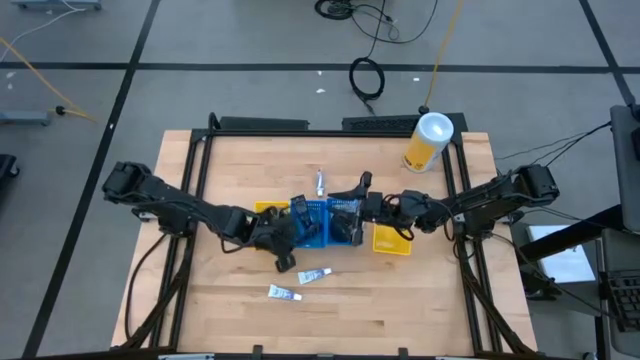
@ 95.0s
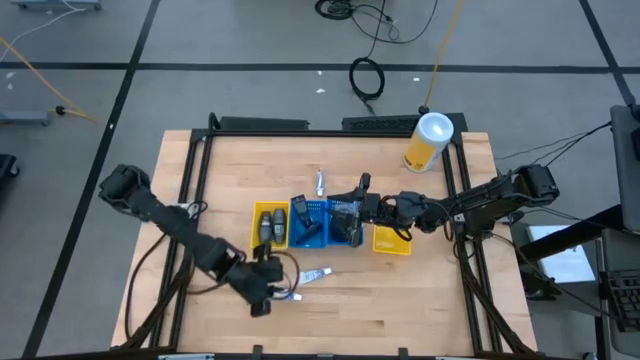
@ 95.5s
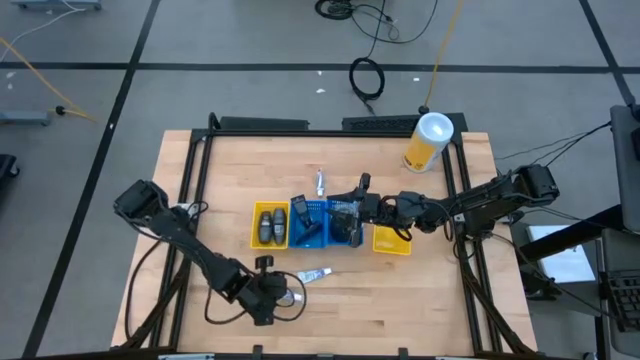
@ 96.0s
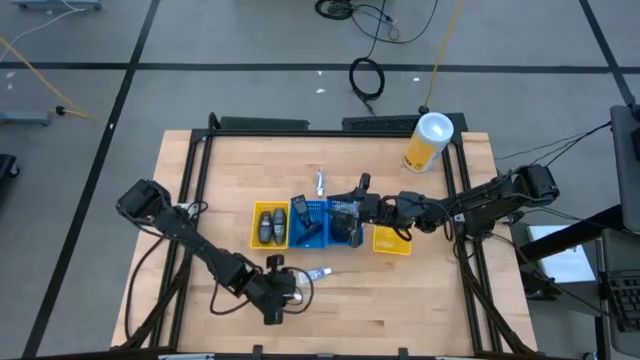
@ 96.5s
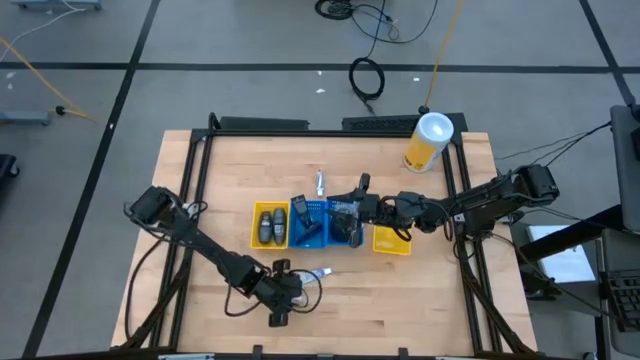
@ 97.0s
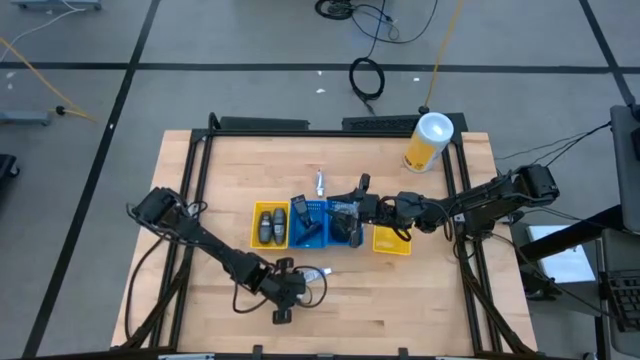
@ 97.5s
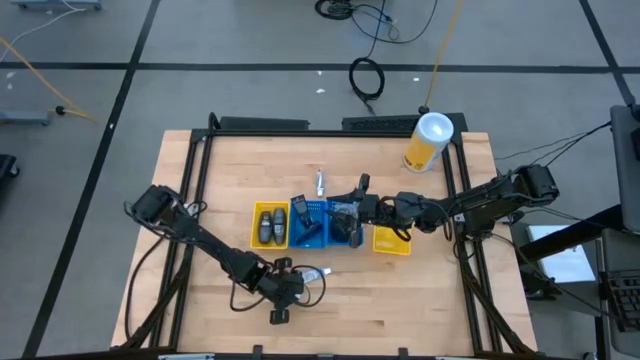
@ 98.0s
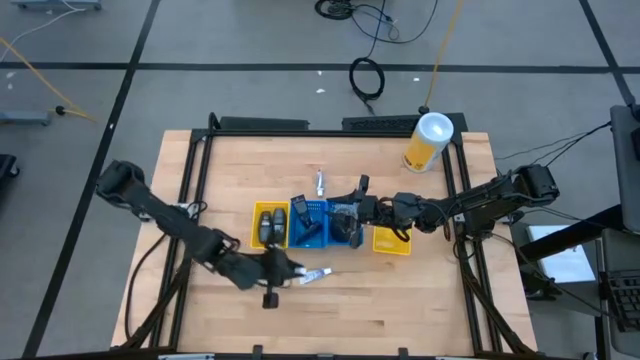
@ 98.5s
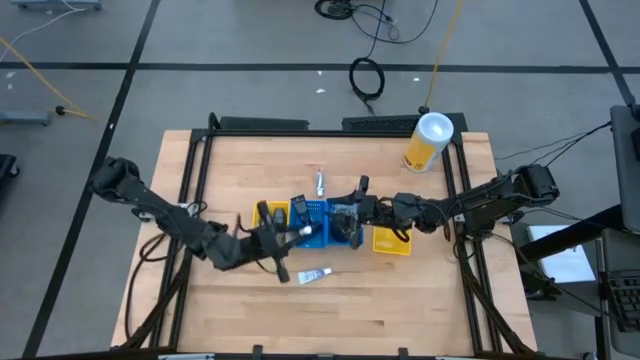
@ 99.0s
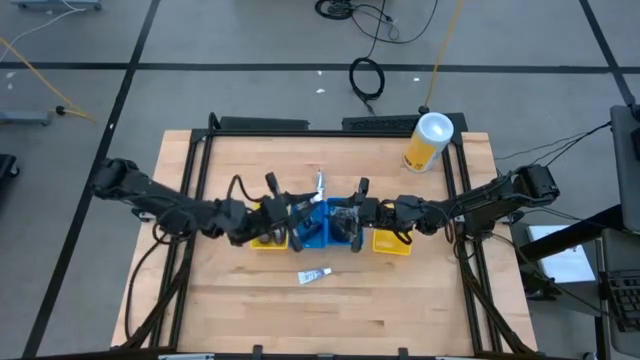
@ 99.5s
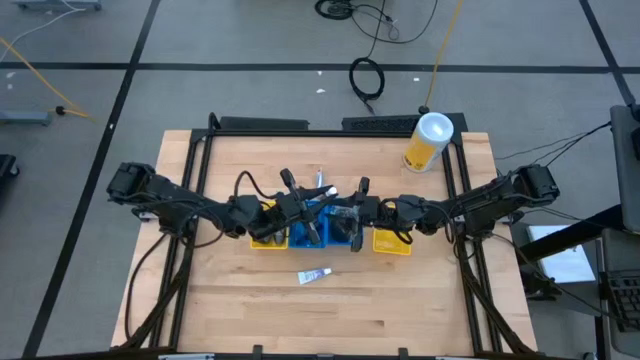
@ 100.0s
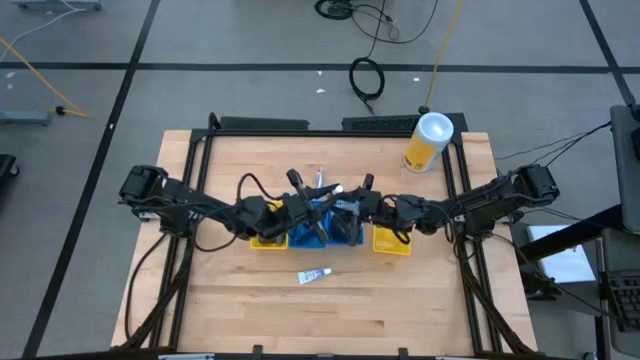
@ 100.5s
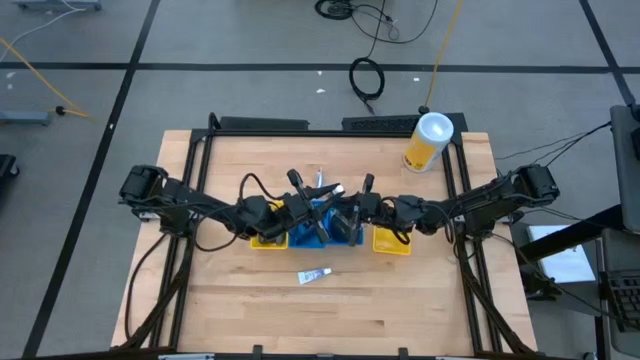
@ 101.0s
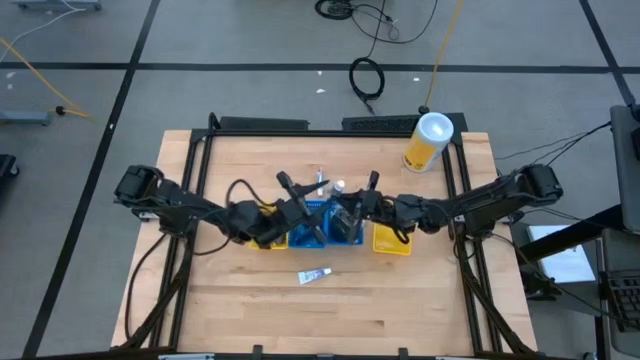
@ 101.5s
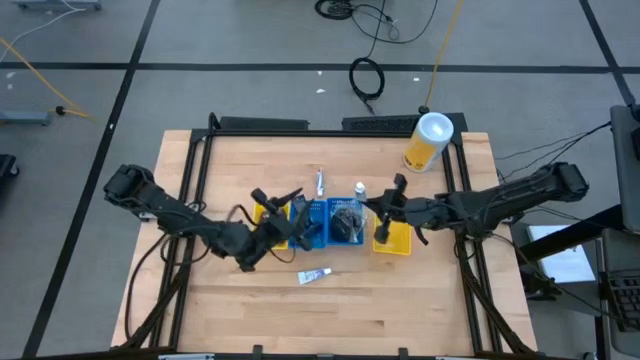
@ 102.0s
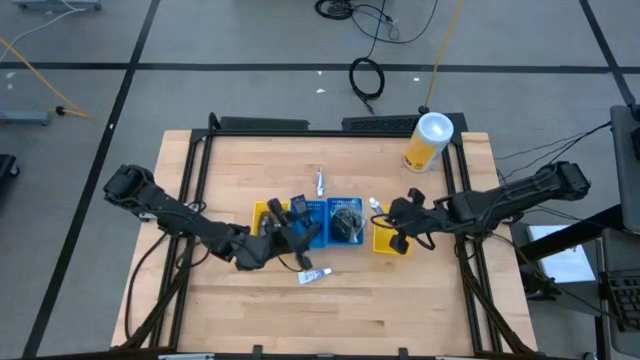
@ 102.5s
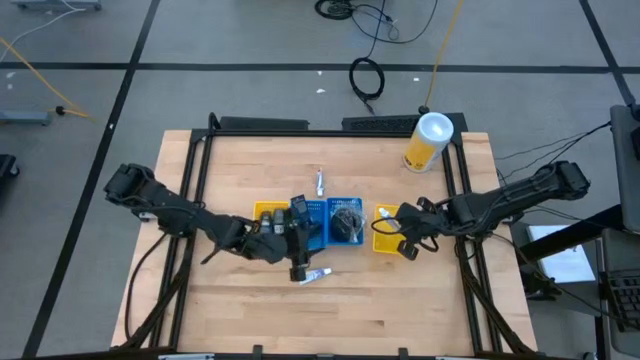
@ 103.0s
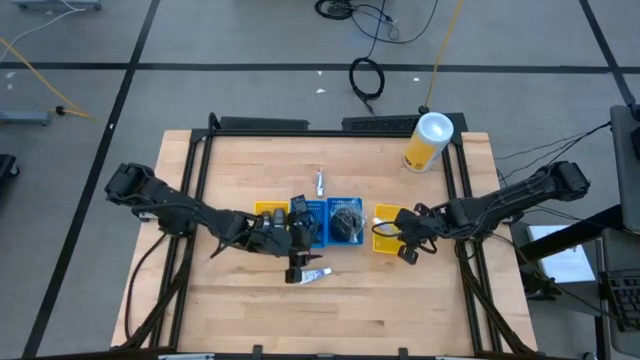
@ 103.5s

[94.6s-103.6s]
Task: Pick & Place Travel size toiletries
Put the toothpaste into the right yellow bin

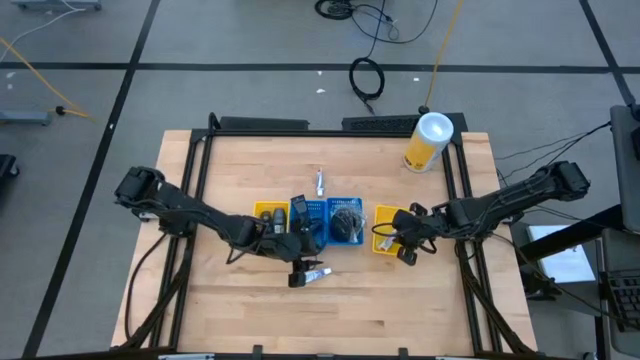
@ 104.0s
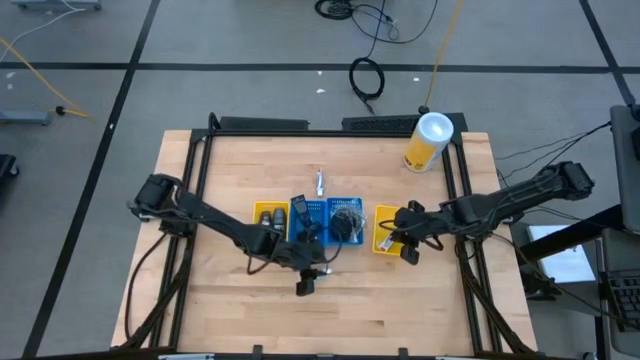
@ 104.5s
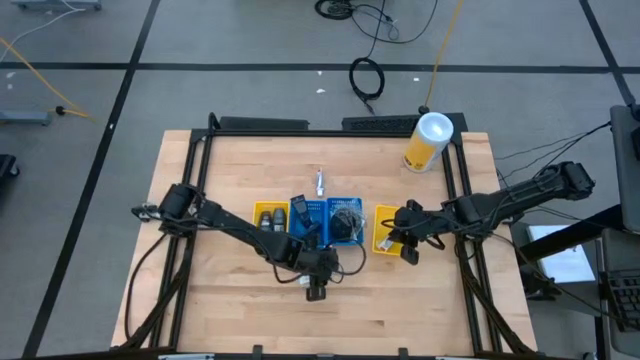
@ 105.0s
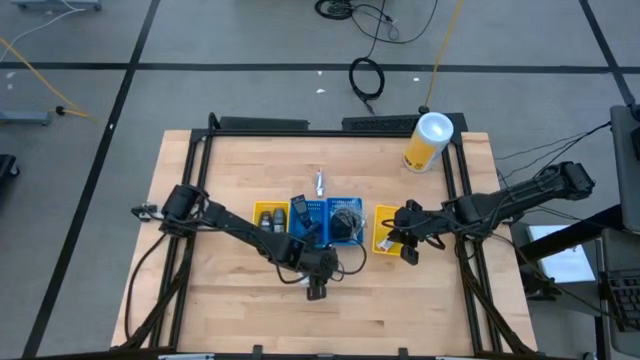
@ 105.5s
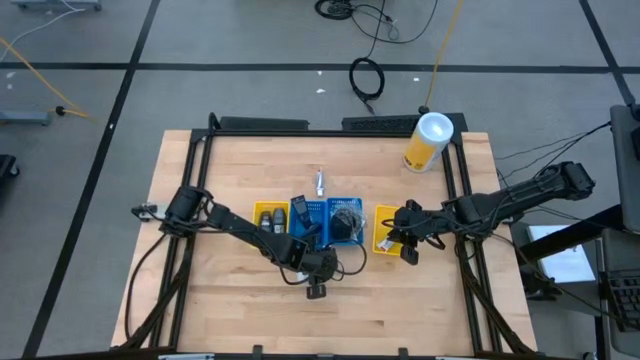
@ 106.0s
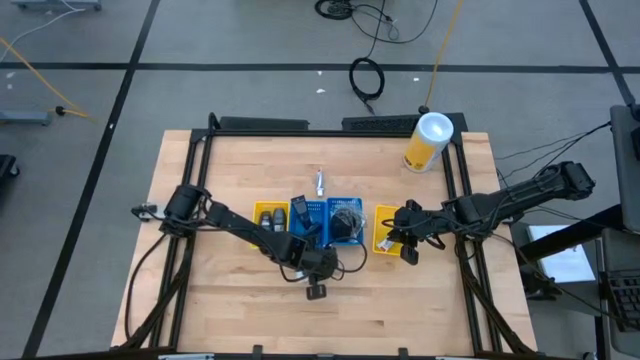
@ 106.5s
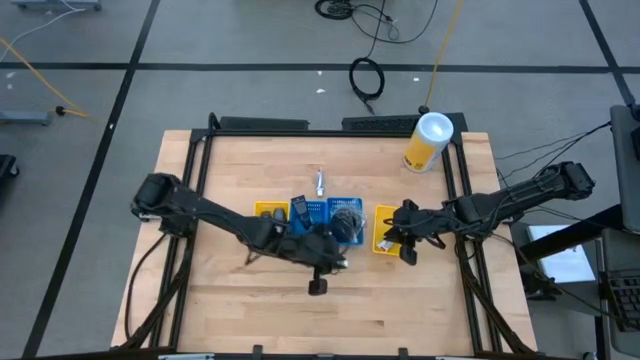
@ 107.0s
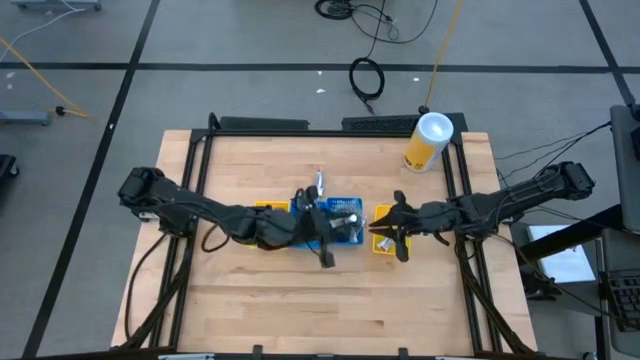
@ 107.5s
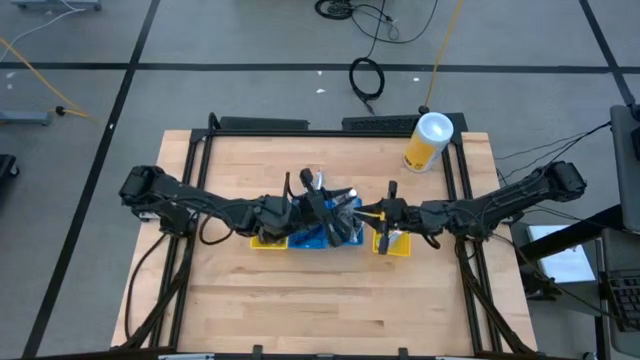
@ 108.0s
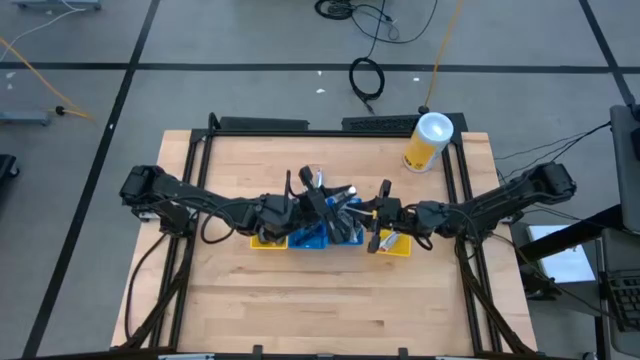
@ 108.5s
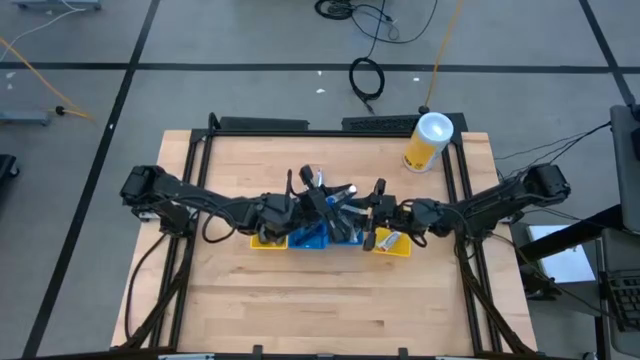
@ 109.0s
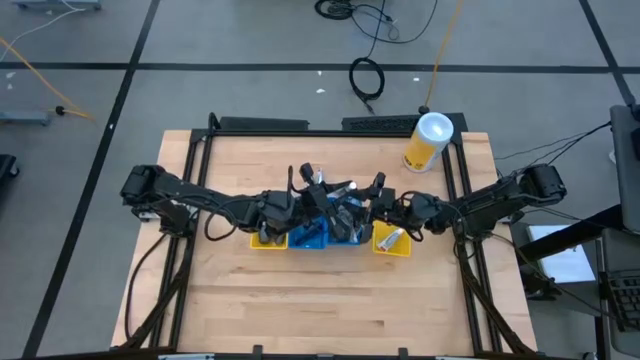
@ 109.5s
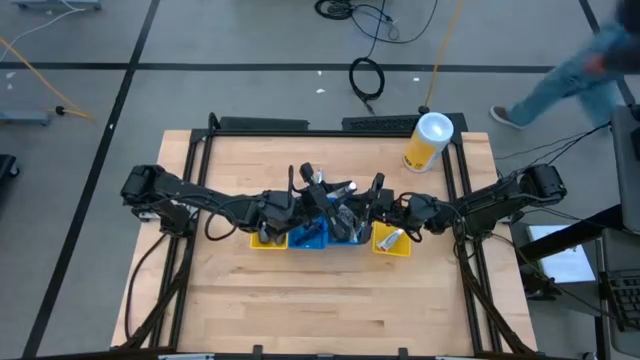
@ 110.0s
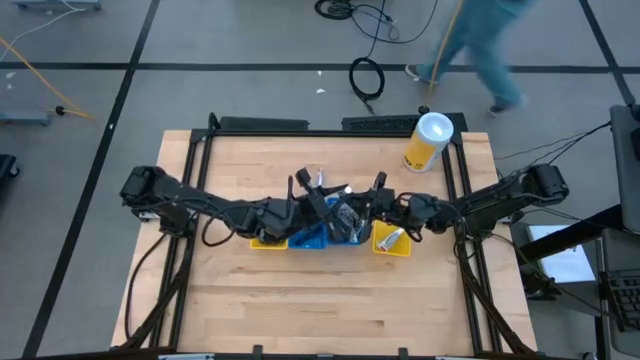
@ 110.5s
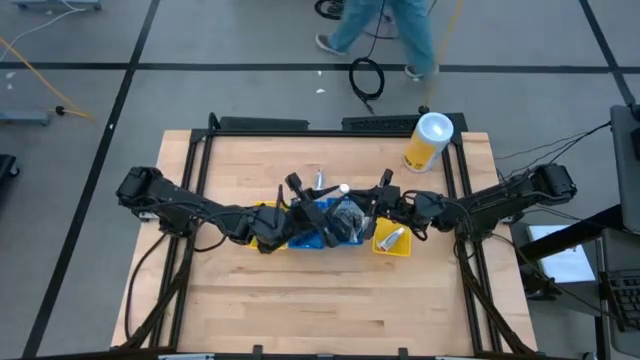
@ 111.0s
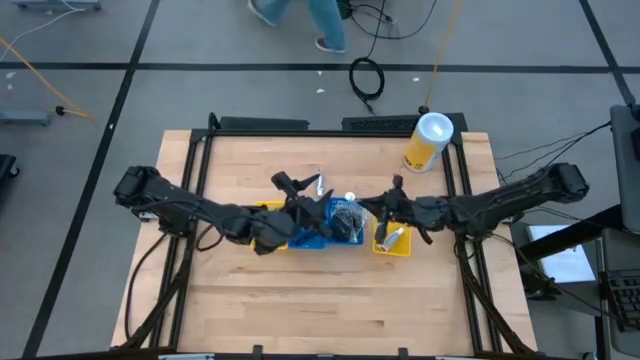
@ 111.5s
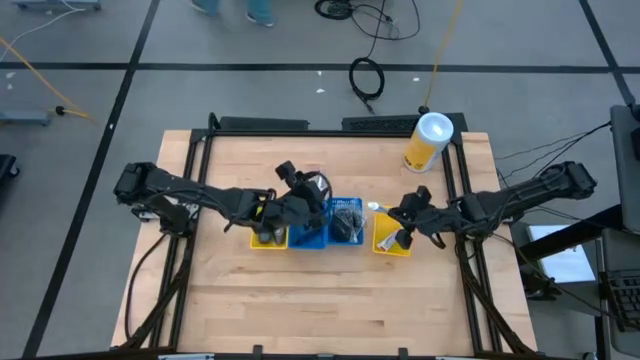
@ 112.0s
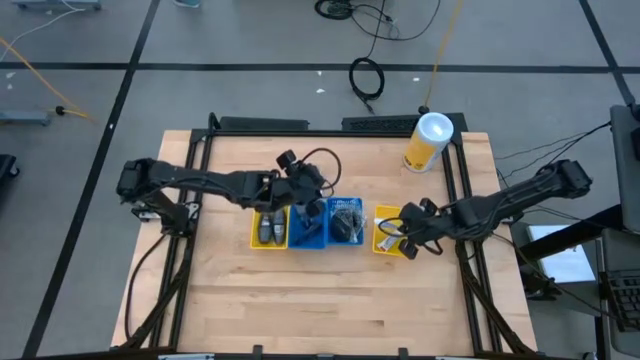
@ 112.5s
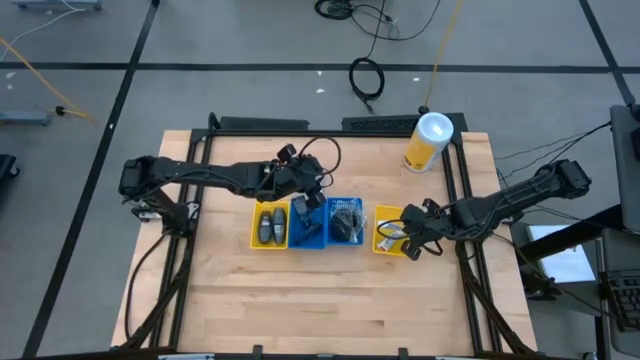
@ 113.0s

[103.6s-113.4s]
Put the toothpaste into the right yellow bin

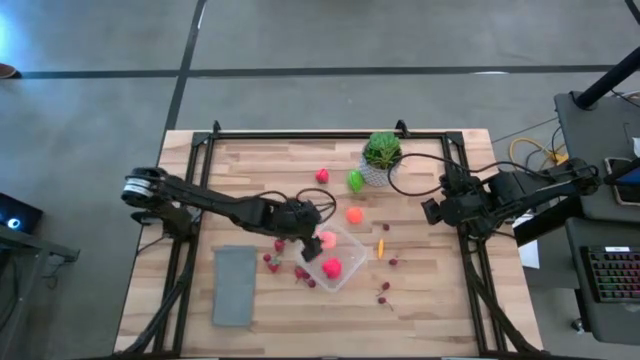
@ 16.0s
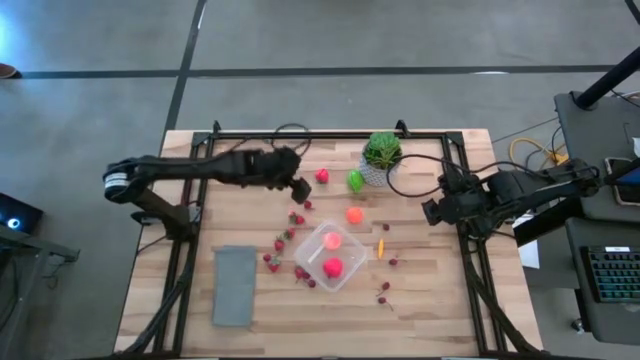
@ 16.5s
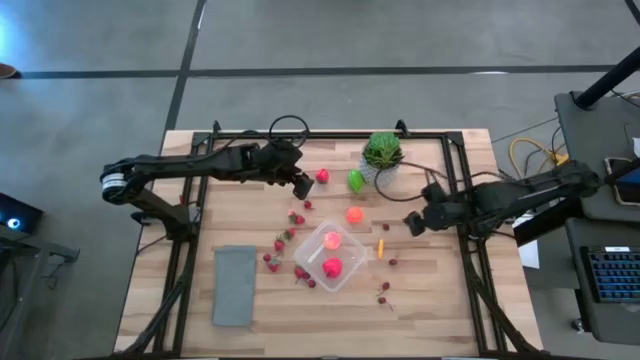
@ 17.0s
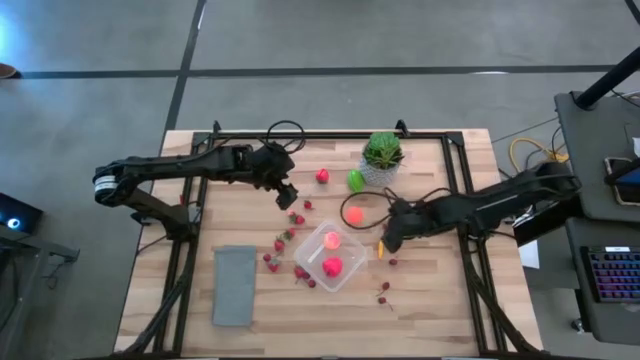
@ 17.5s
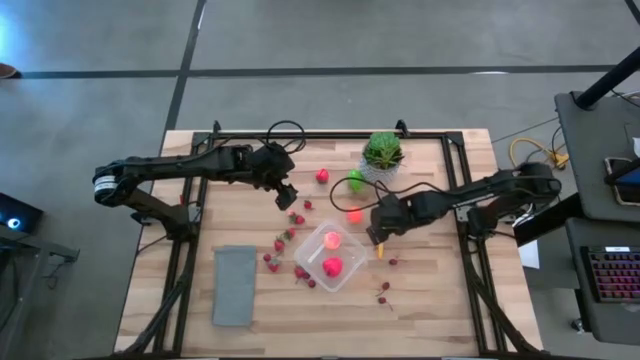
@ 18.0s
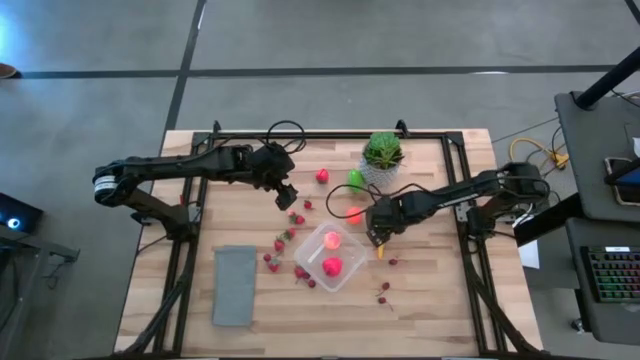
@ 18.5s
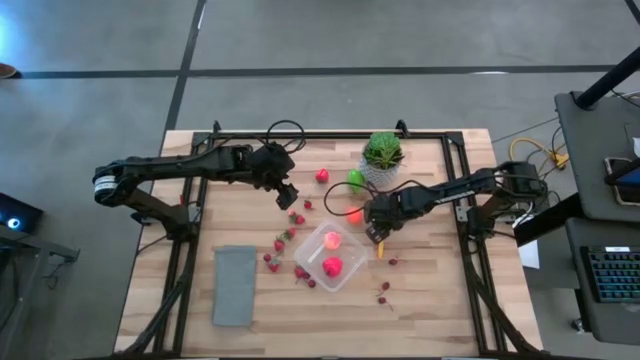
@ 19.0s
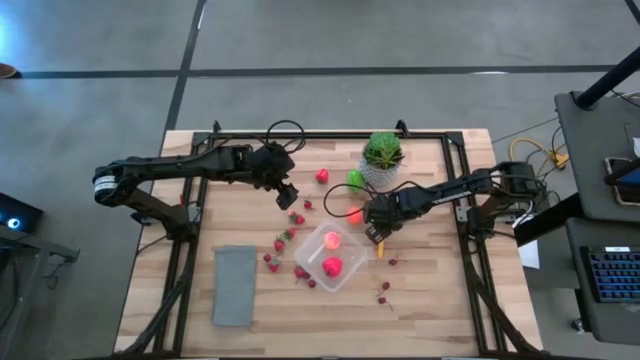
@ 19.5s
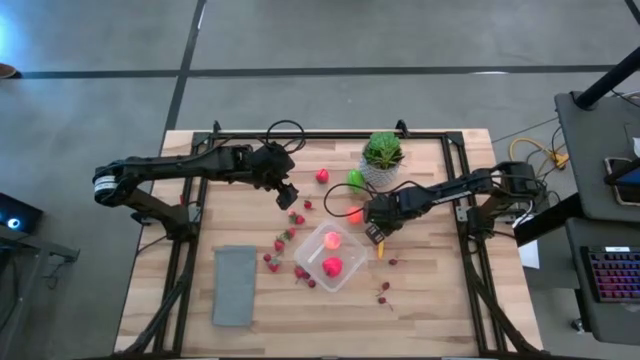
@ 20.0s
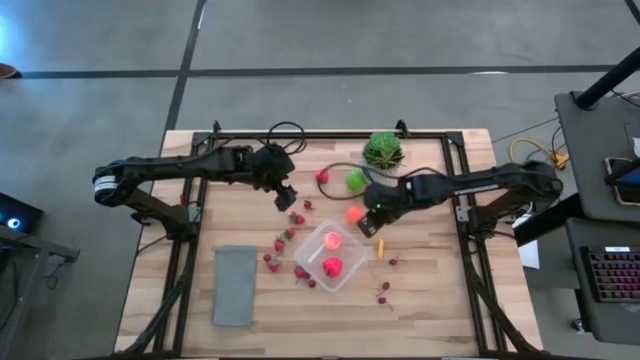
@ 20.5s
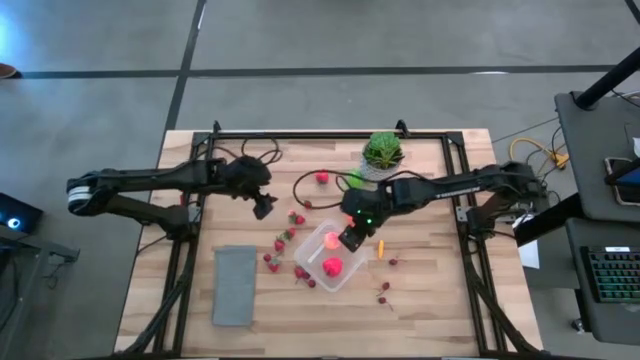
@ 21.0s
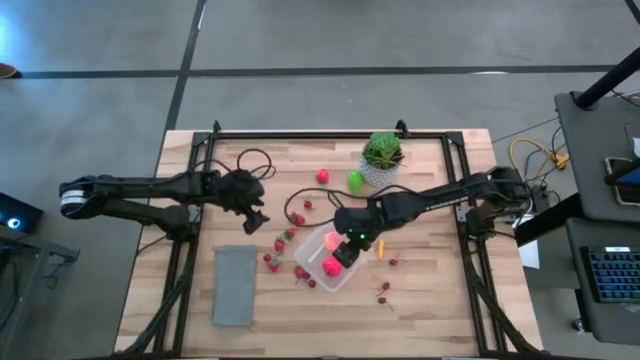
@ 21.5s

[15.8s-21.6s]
Task: Pick and placing Produce into tupperware
Put the red cherry into the transparent bin
